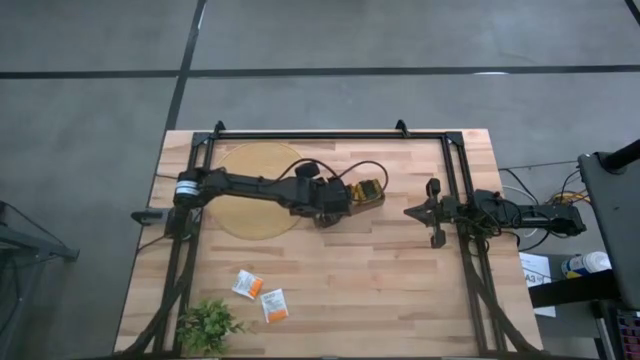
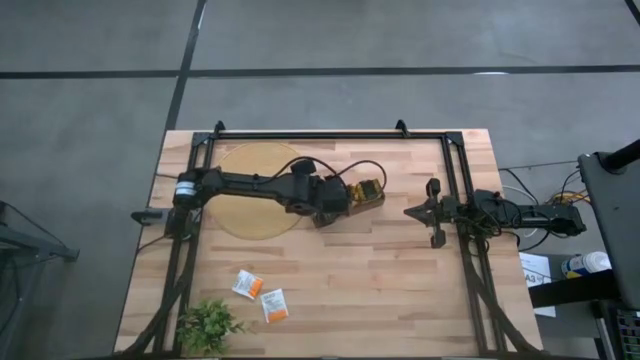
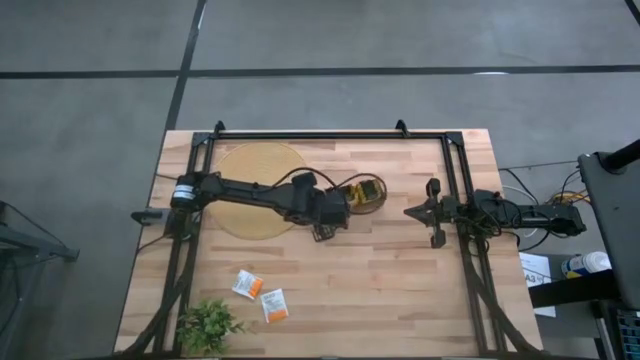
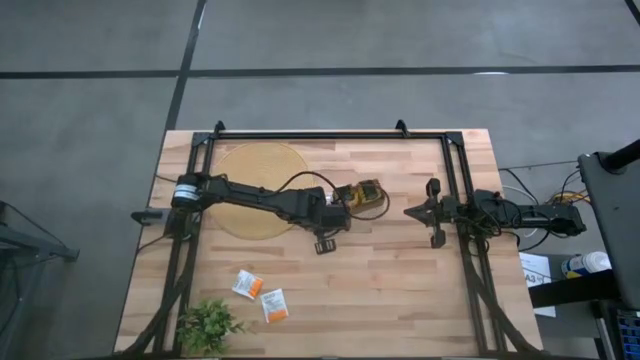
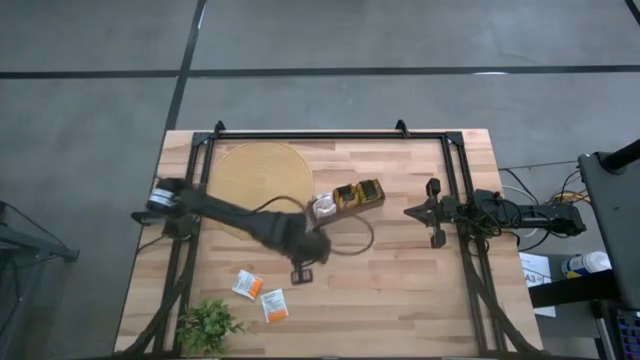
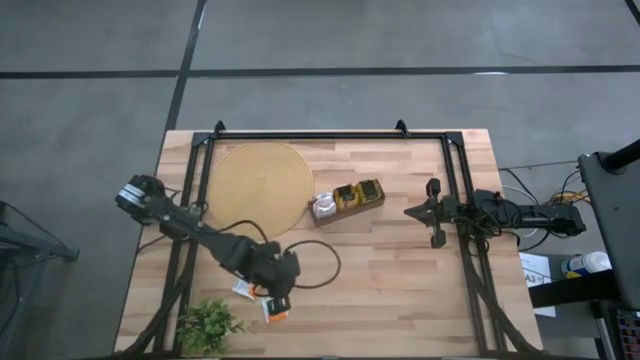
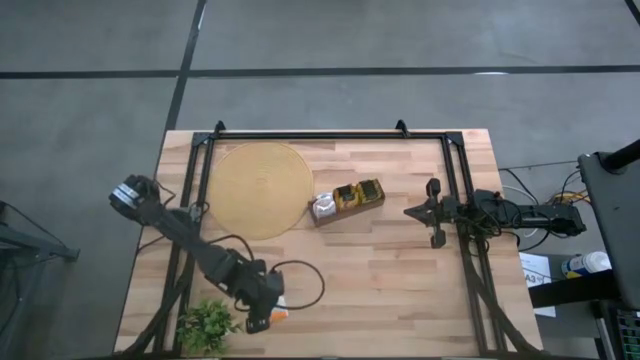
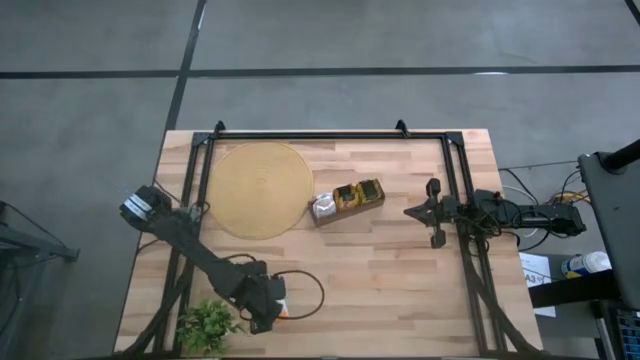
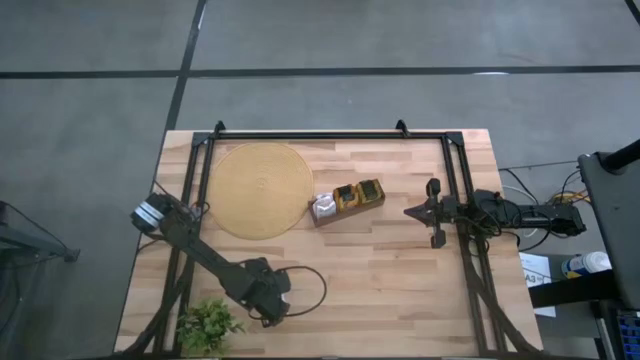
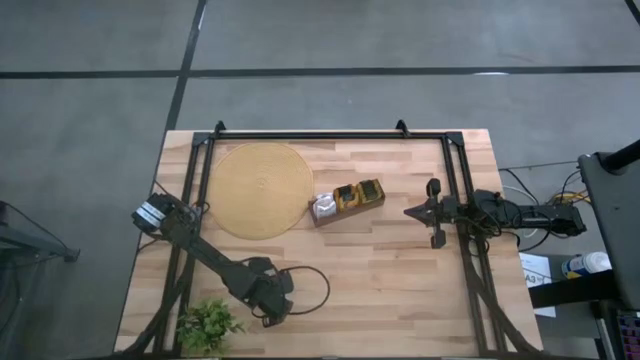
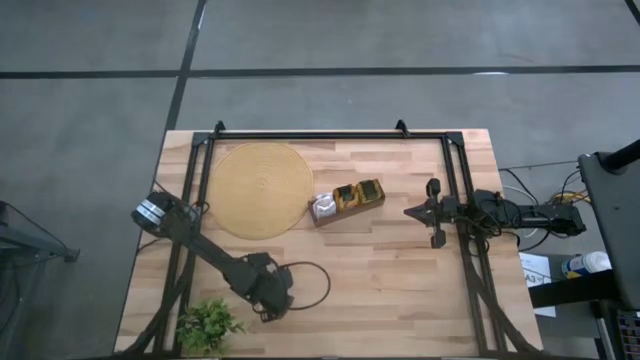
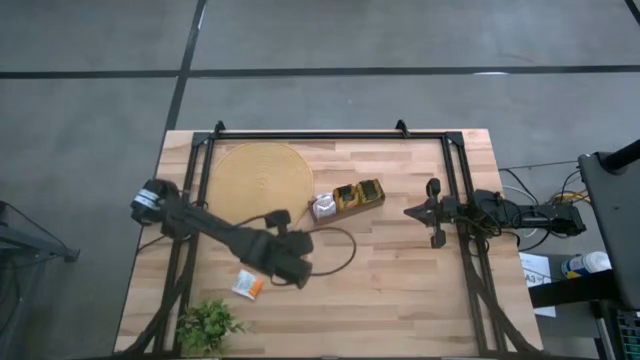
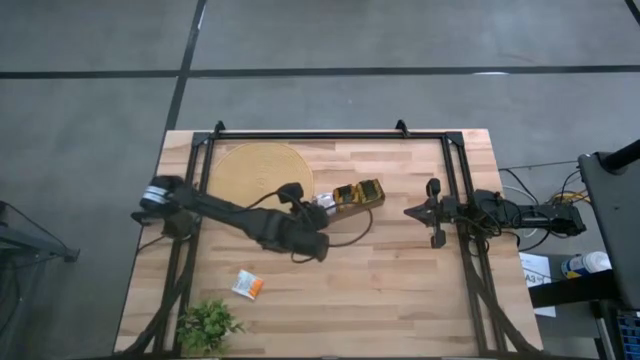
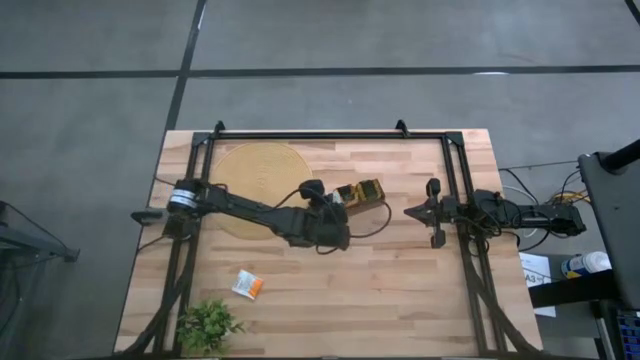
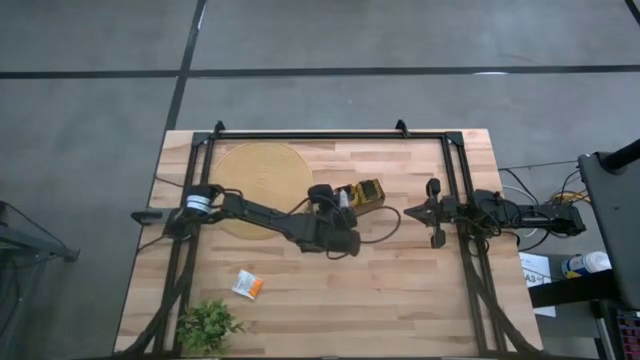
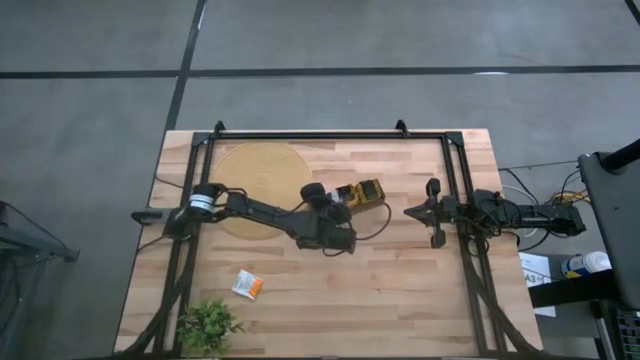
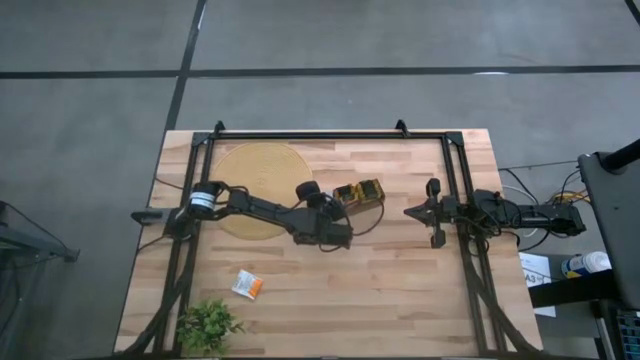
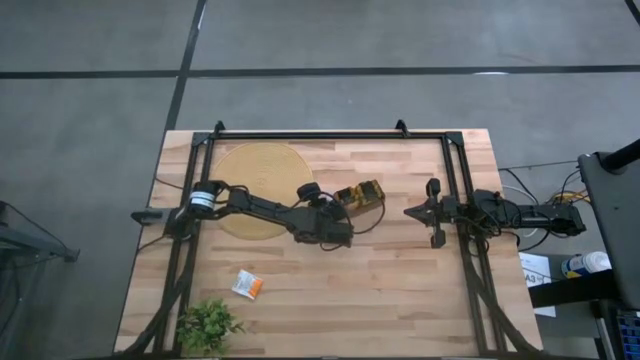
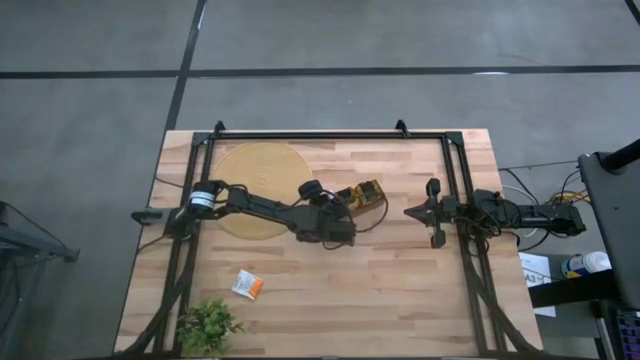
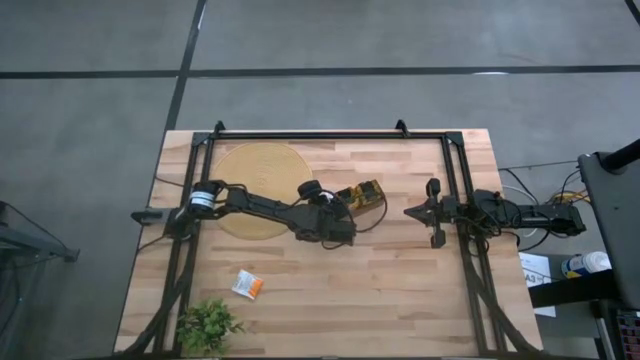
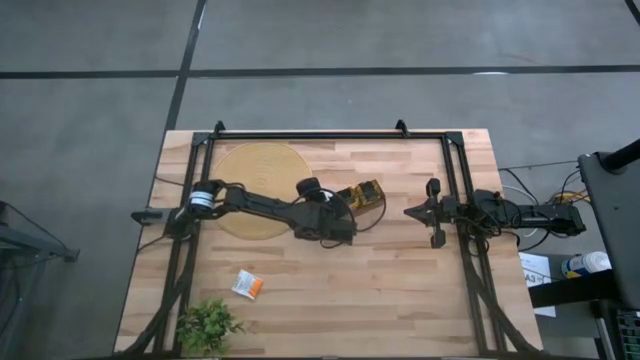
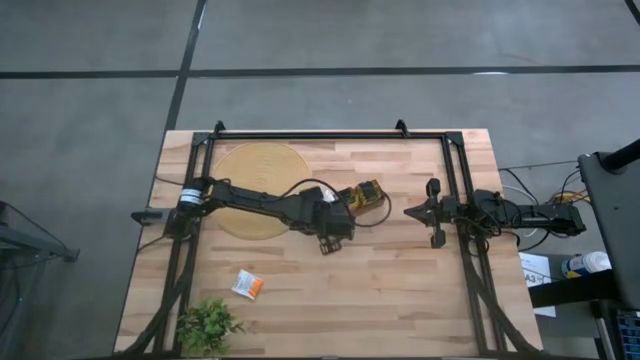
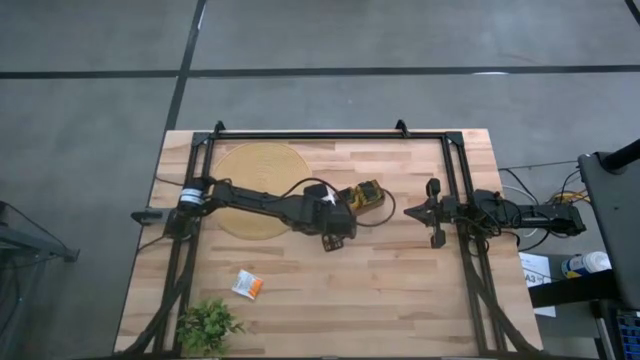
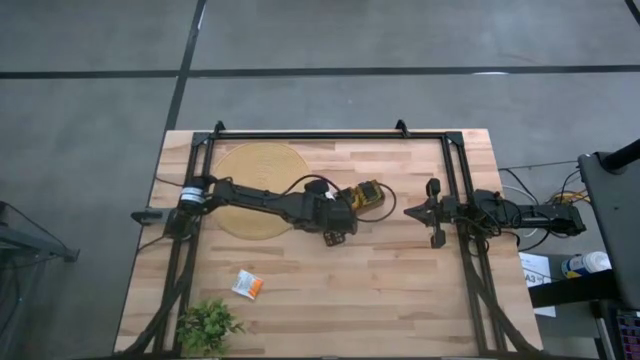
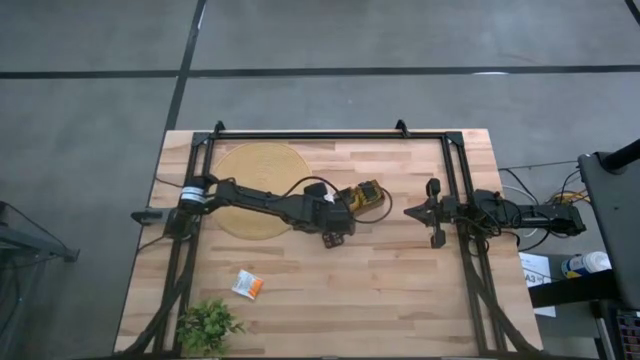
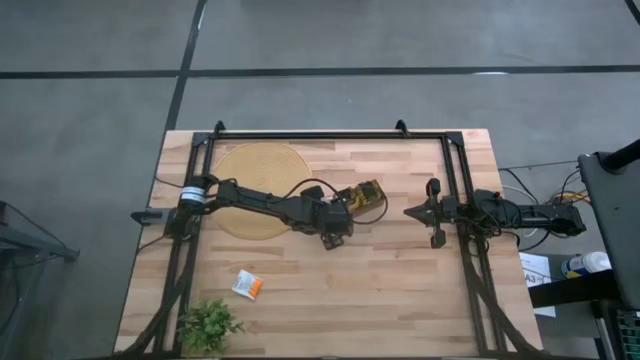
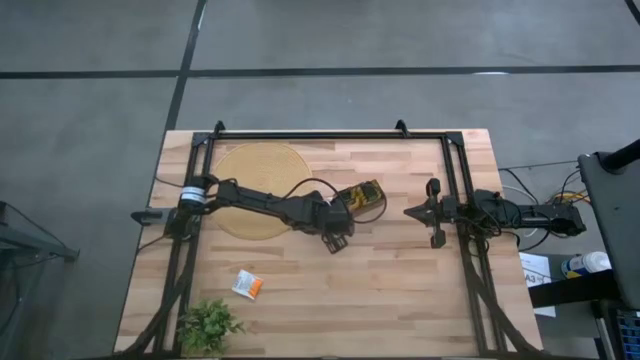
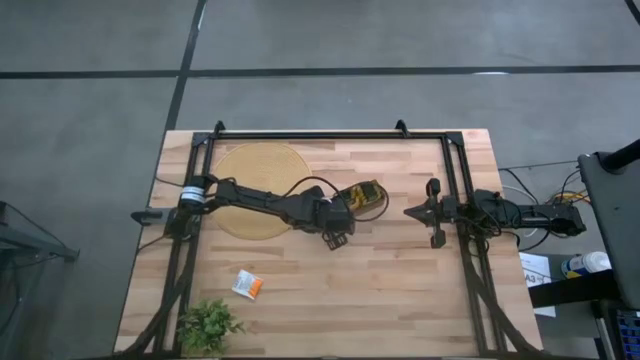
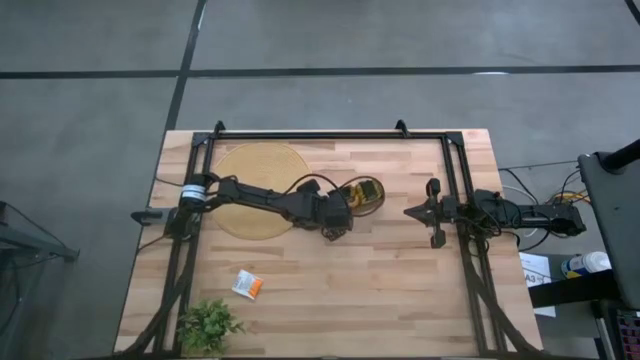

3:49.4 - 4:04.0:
Task: Pick & Place Tea
Put the white tea bag into the left section of the wooden organizer
